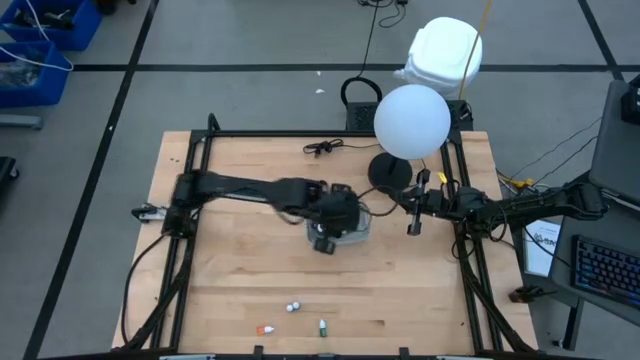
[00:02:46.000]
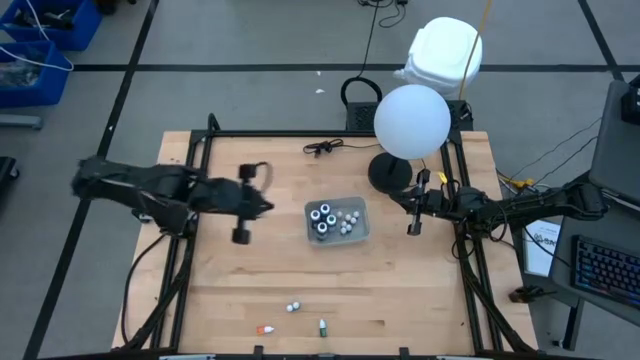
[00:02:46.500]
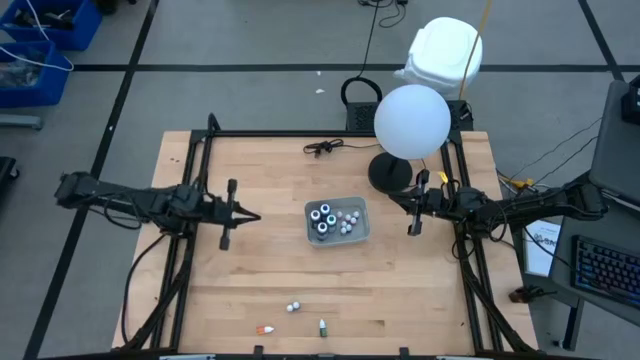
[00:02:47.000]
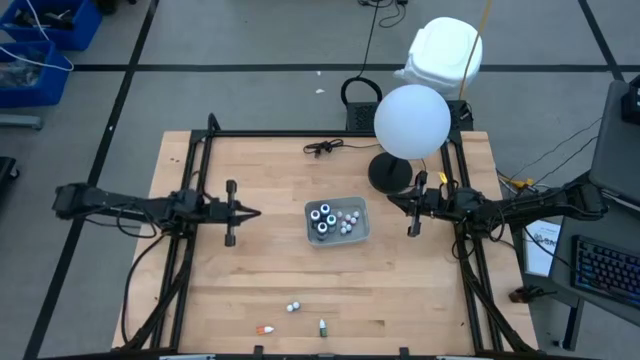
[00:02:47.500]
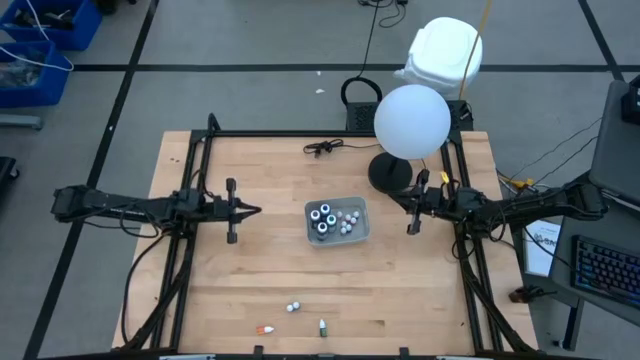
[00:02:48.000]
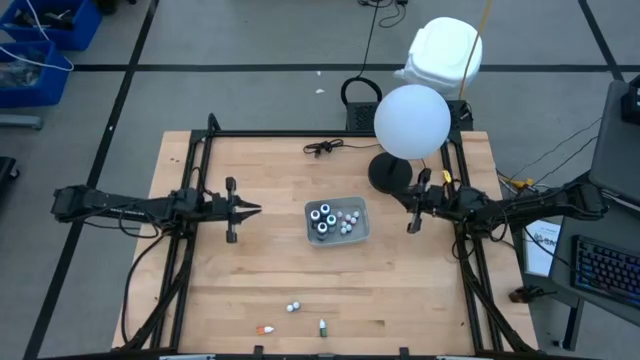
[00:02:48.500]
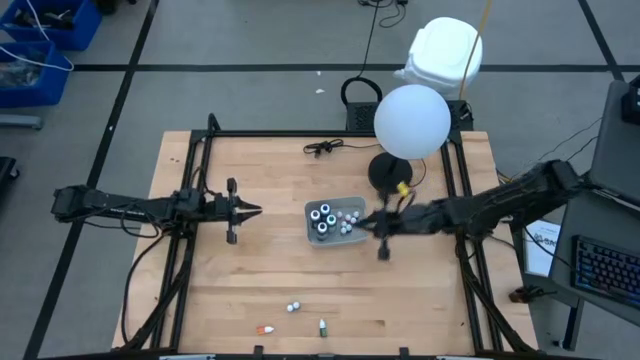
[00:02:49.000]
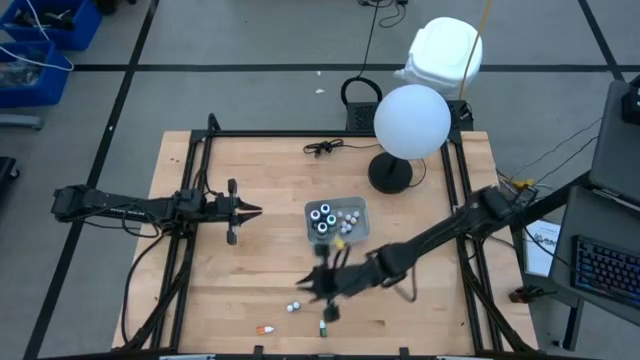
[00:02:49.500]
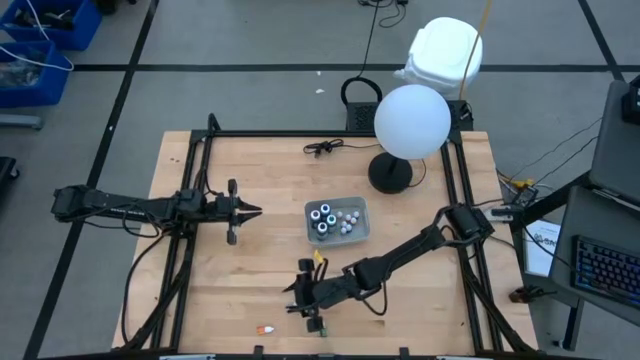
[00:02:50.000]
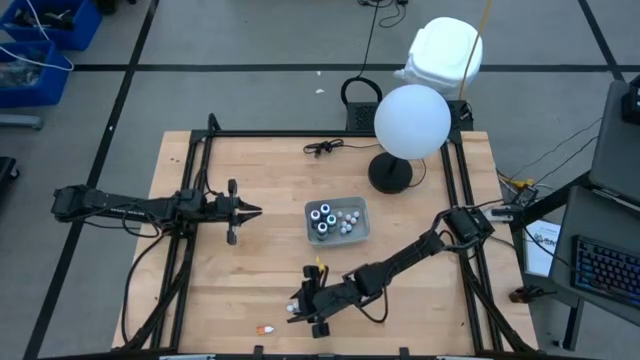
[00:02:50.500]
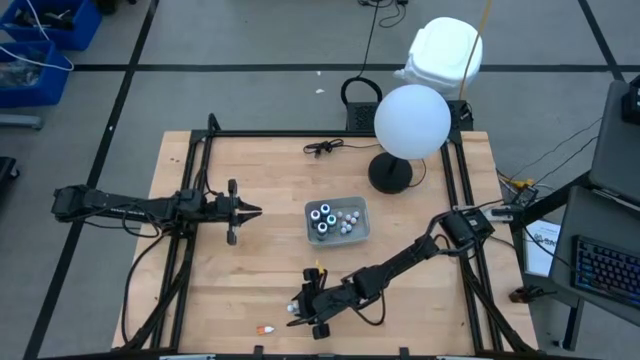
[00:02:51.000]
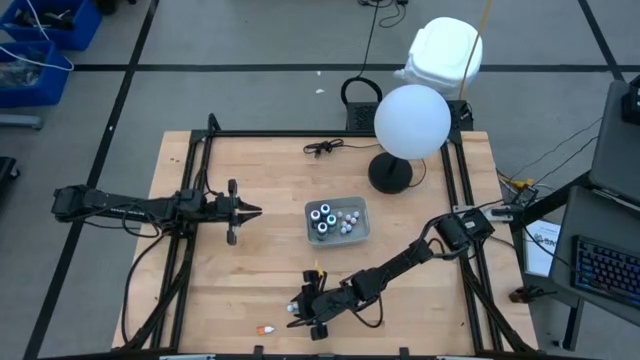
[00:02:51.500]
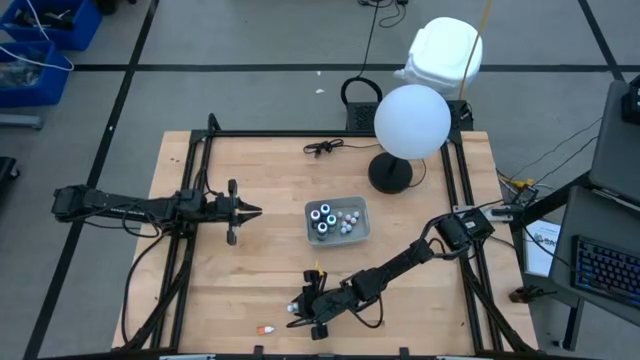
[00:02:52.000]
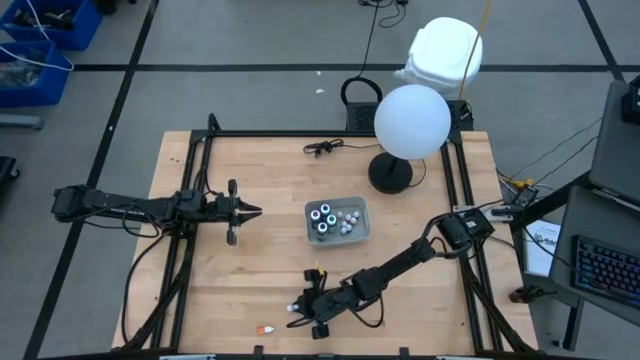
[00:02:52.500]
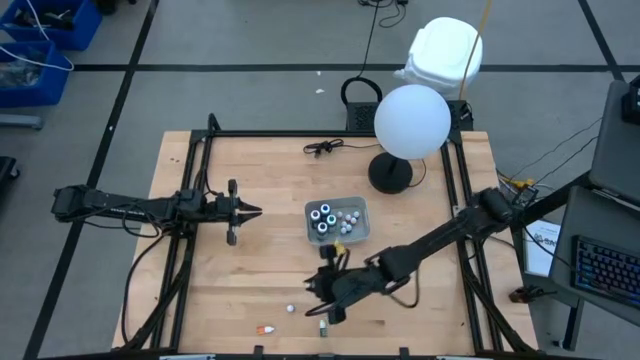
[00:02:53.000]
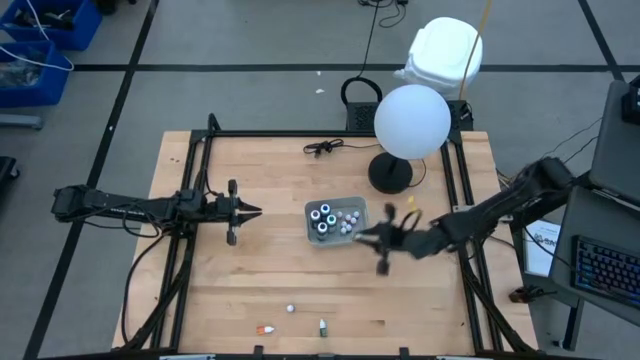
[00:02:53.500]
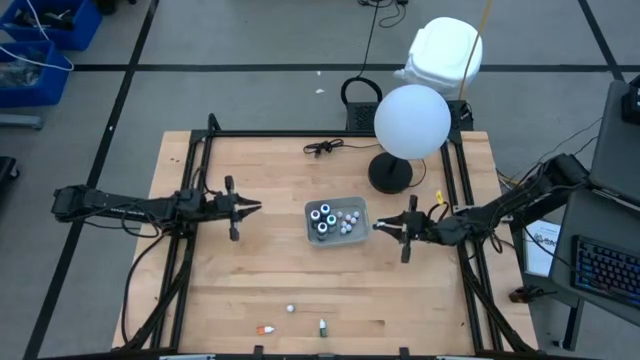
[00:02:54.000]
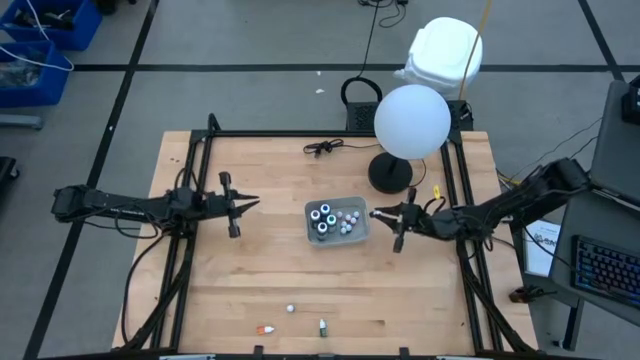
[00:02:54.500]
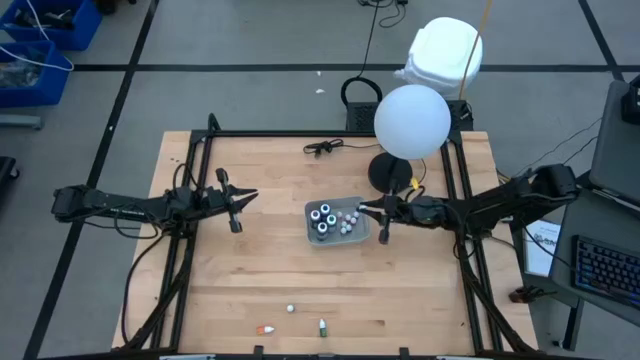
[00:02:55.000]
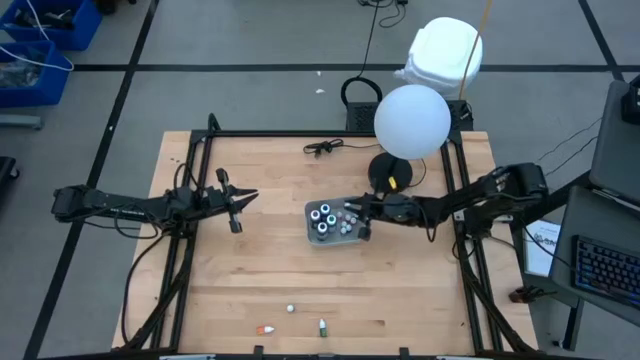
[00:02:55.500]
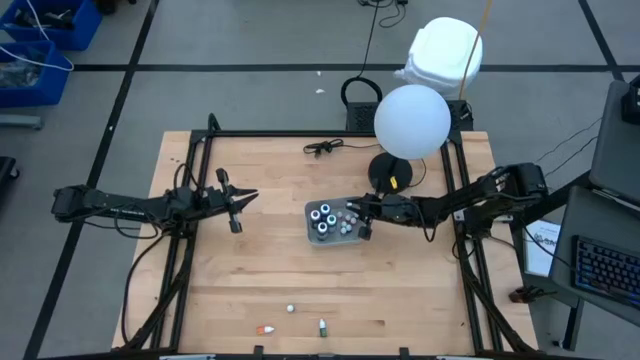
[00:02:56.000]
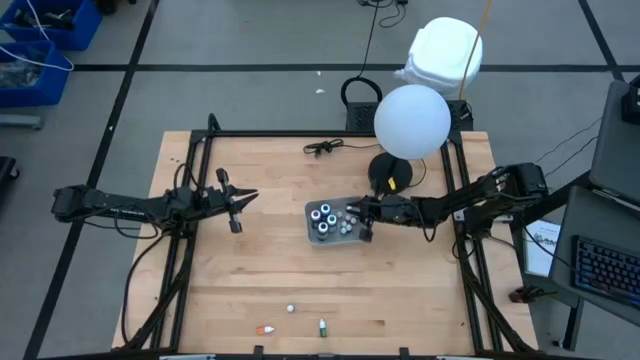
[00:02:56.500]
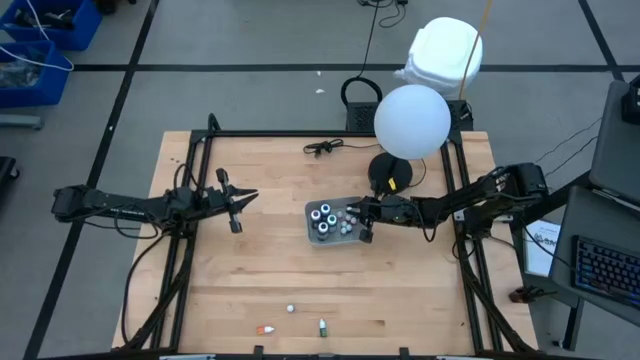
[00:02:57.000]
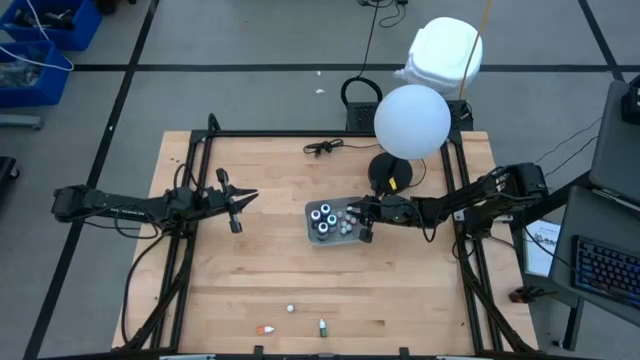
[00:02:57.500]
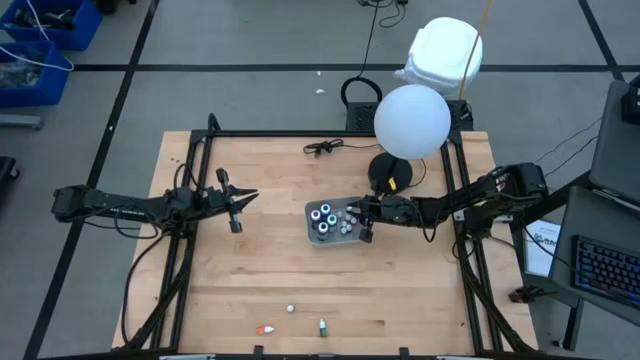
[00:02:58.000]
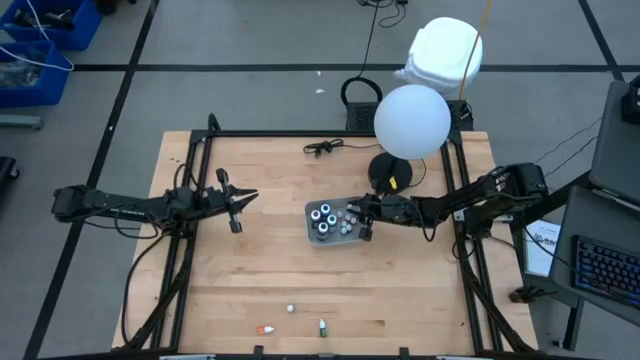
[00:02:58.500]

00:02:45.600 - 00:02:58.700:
Task: Pick & Place food coloring
Put the small blue food coloring bottle into the gray bin

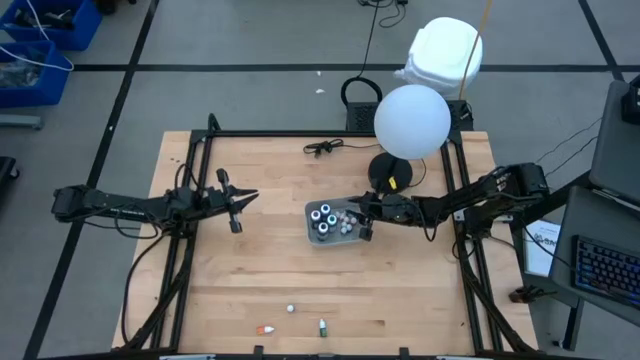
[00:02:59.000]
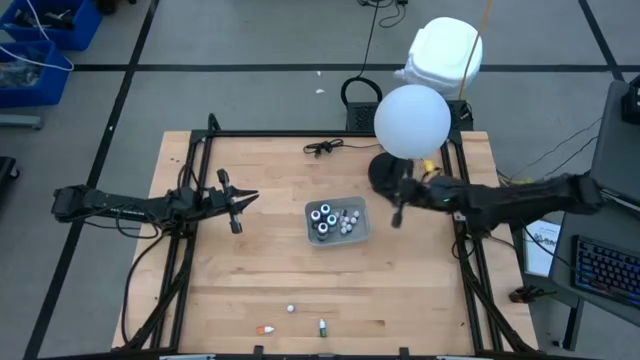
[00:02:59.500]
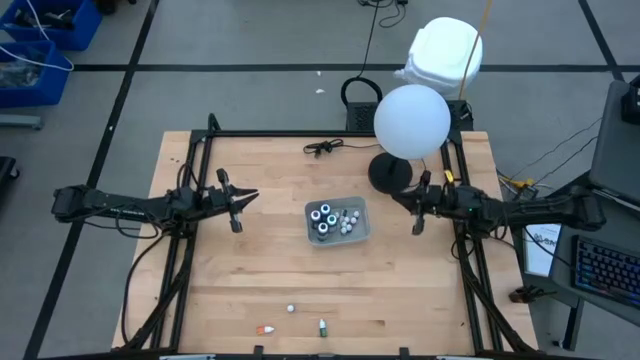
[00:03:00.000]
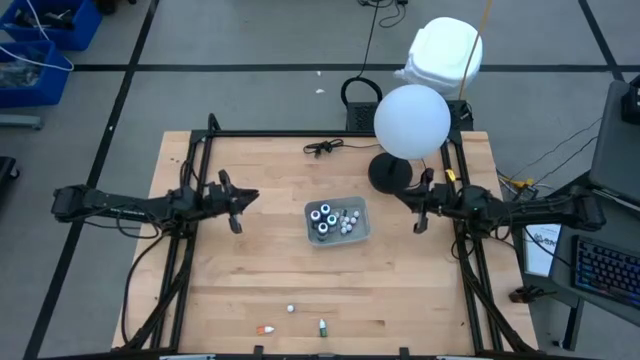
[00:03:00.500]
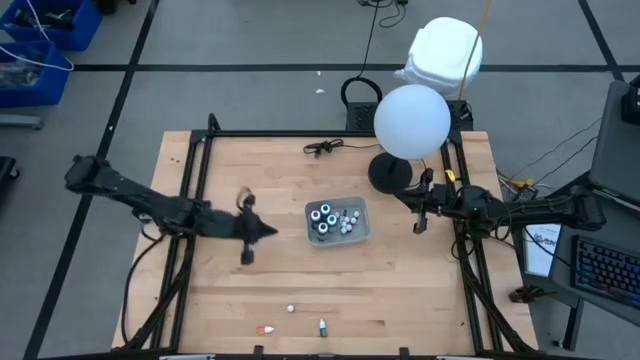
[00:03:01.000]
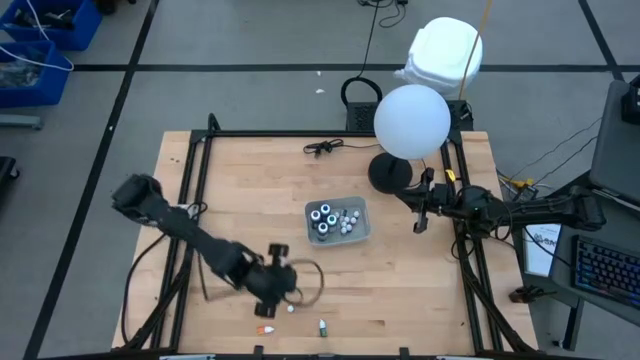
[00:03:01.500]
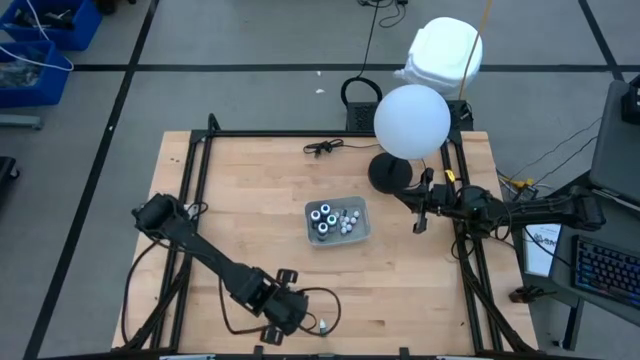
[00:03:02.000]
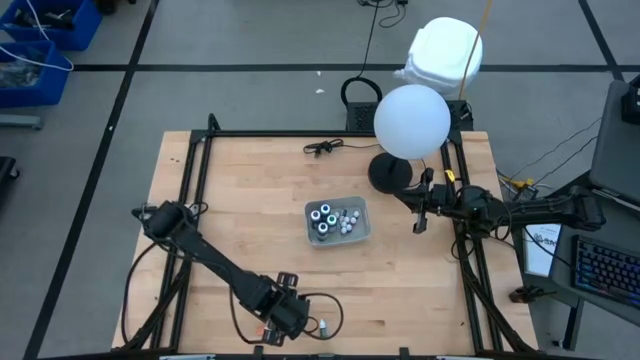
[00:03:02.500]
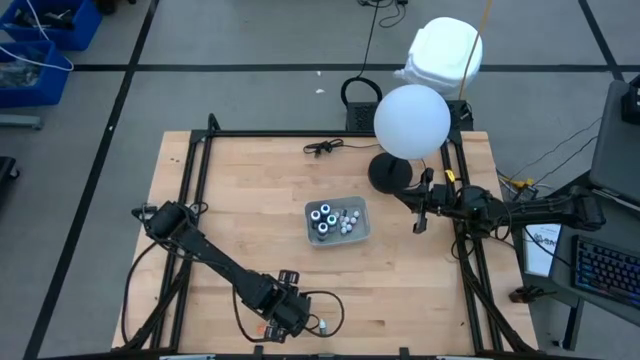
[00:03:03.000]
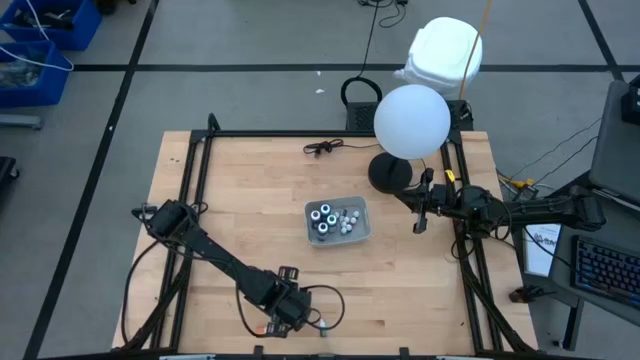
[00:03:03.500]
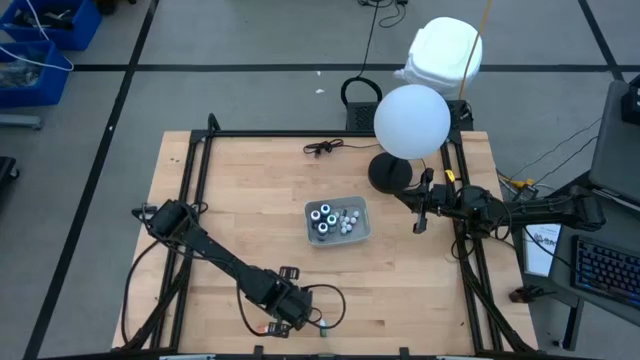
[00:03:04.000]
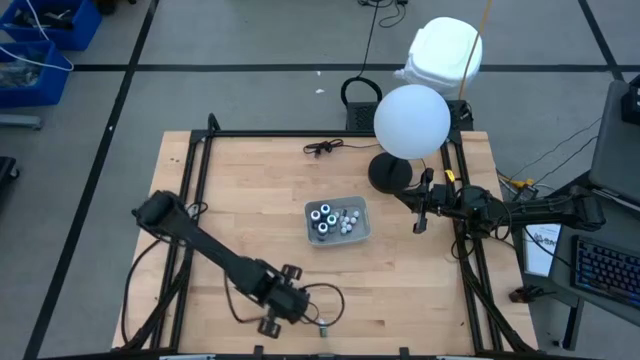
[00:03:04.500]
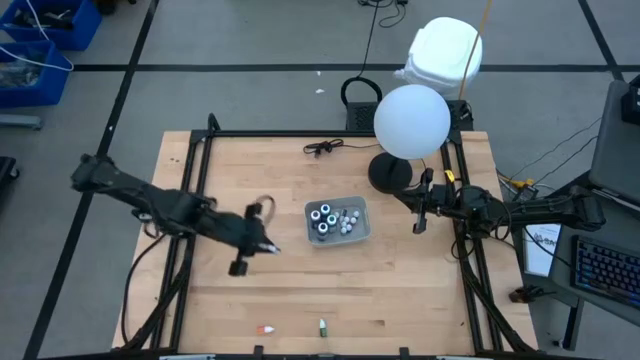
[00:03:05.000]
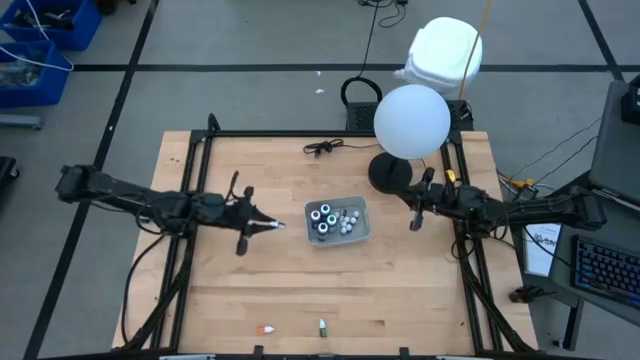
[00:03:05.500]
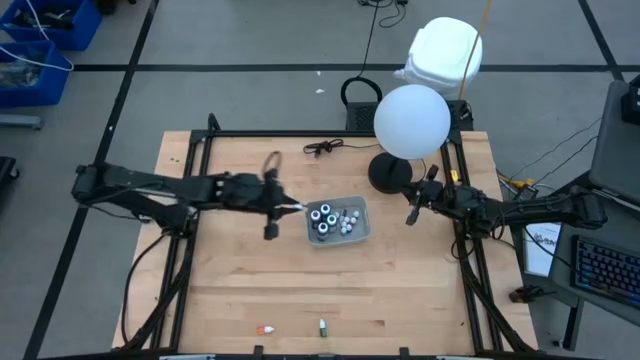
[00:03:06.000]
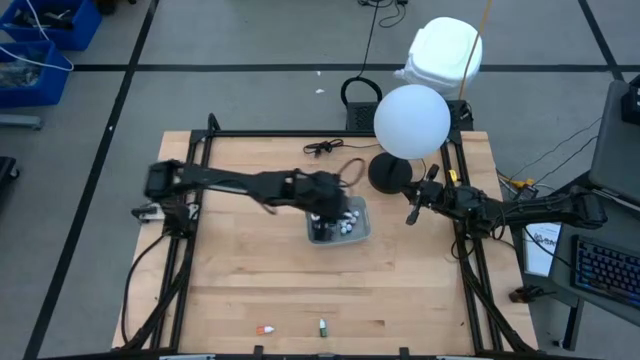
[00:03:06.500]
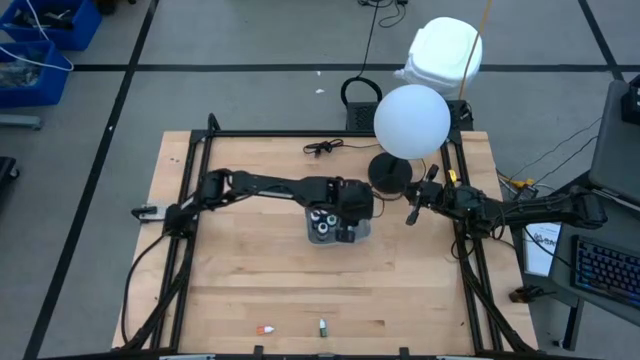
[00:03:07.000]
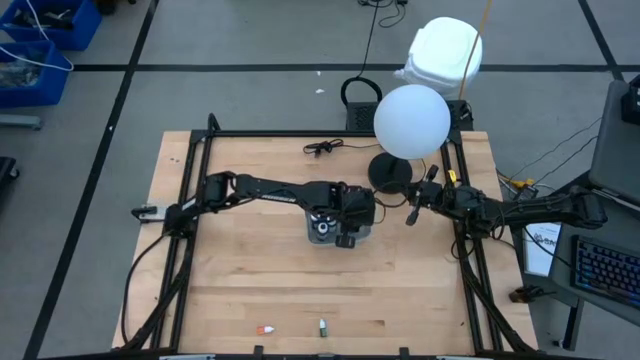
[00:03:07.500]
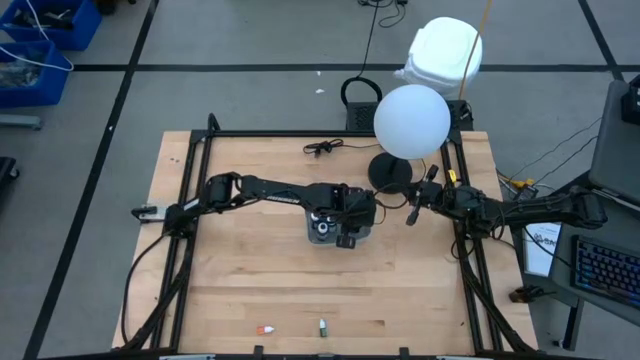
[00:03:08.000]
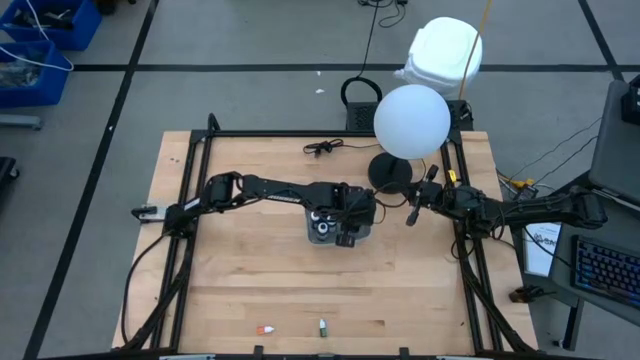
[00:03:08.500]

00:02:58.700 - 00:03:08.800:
Put the small orange food coloring bottle into the gray bin
